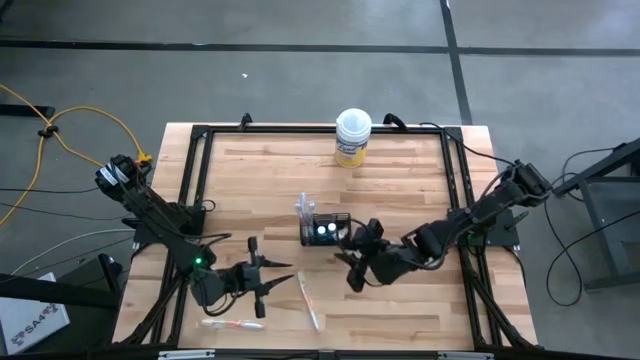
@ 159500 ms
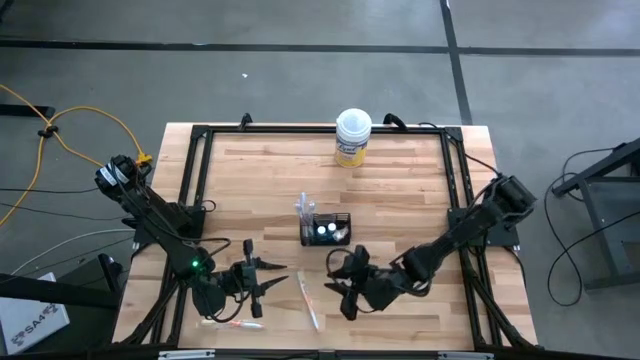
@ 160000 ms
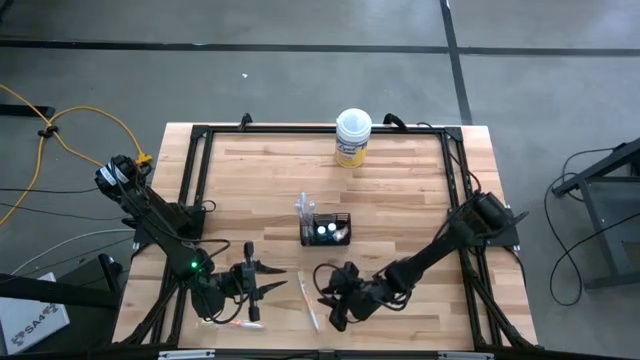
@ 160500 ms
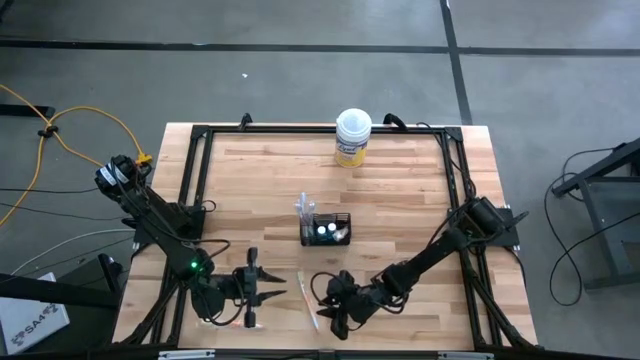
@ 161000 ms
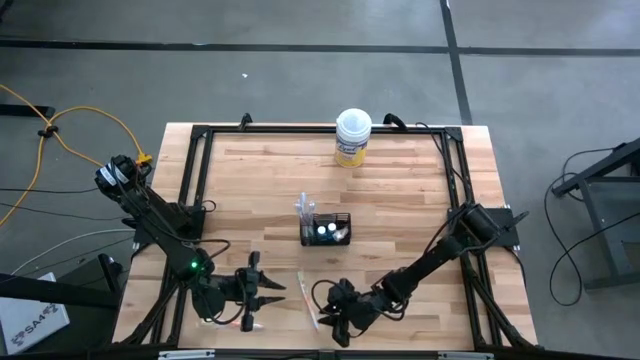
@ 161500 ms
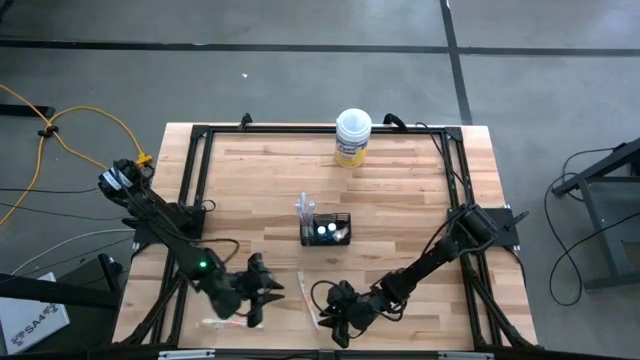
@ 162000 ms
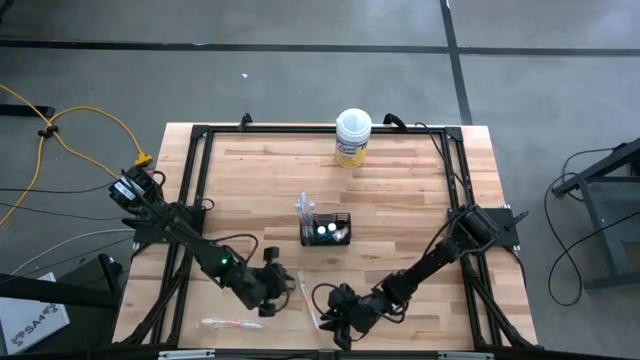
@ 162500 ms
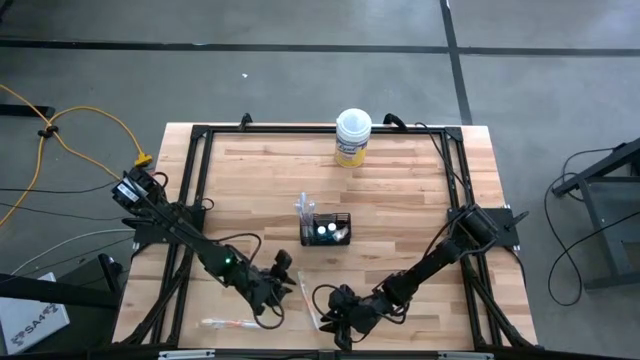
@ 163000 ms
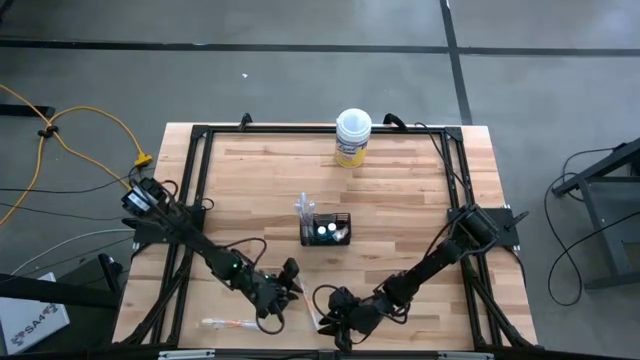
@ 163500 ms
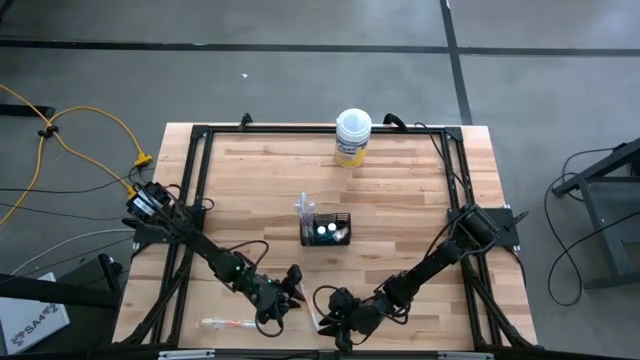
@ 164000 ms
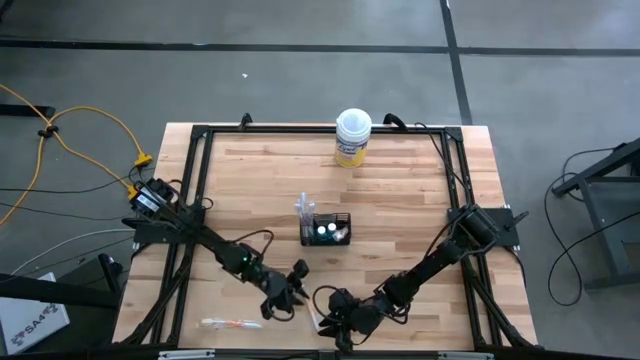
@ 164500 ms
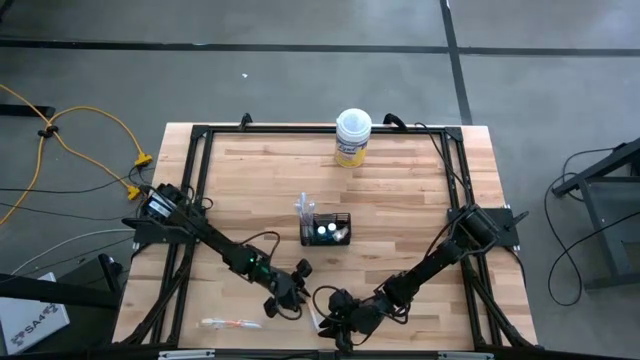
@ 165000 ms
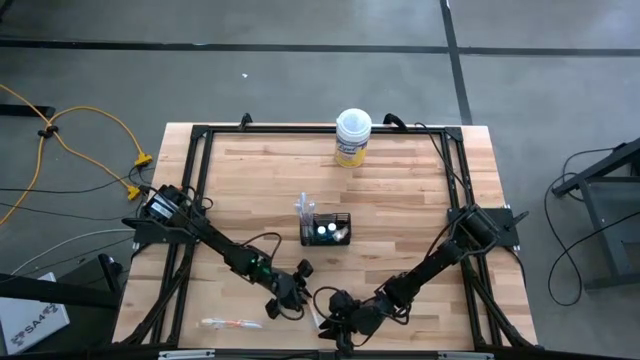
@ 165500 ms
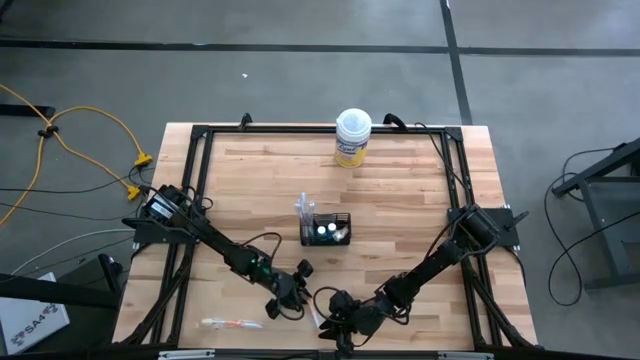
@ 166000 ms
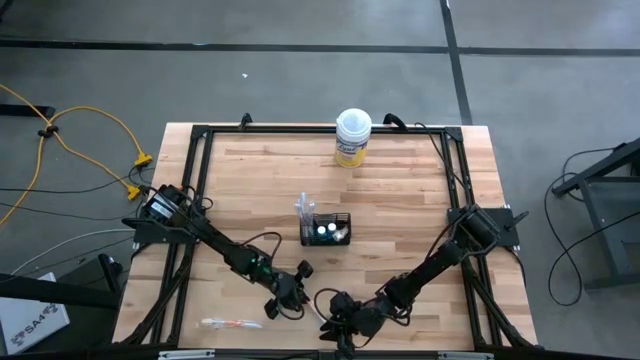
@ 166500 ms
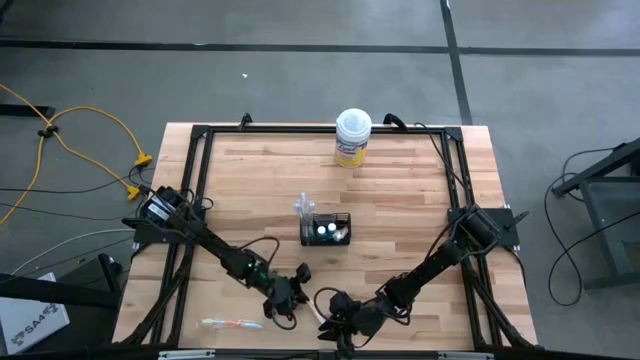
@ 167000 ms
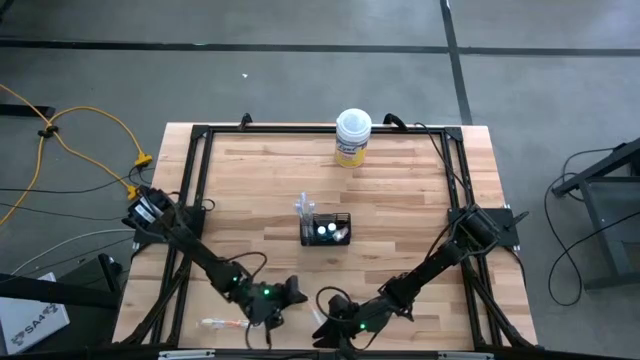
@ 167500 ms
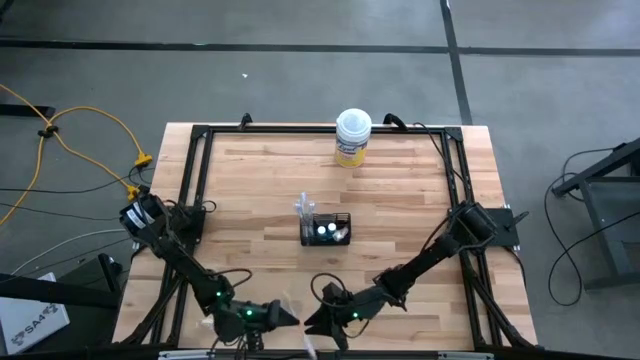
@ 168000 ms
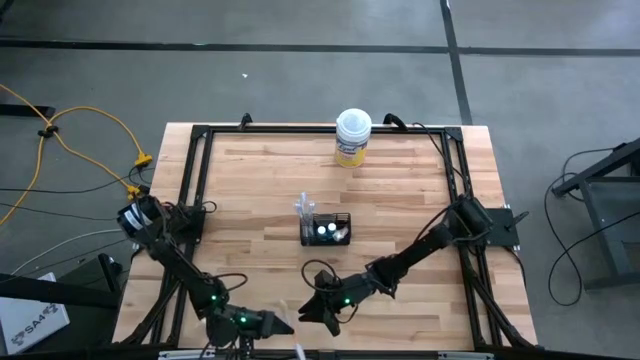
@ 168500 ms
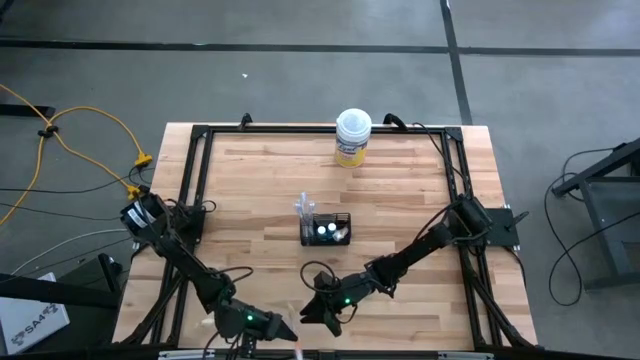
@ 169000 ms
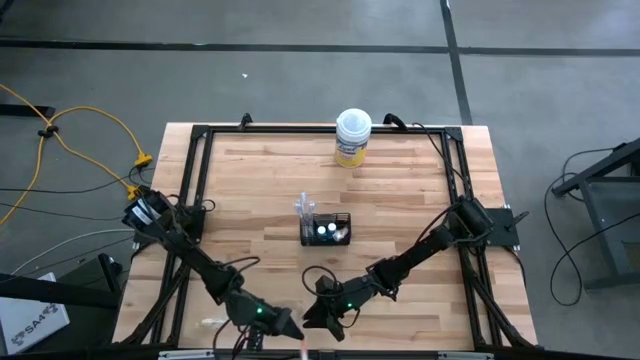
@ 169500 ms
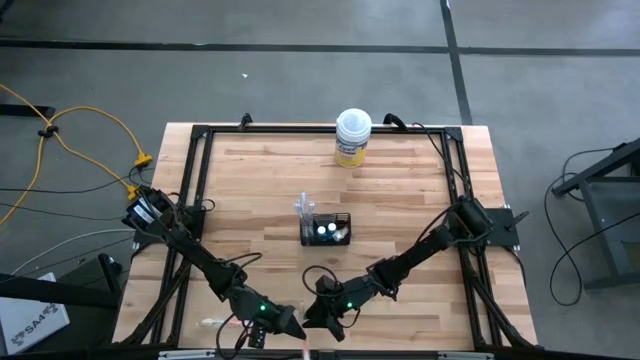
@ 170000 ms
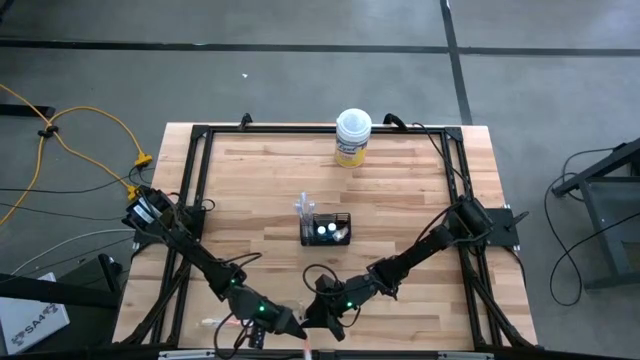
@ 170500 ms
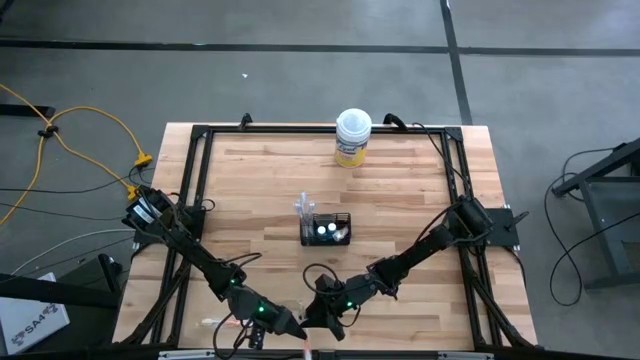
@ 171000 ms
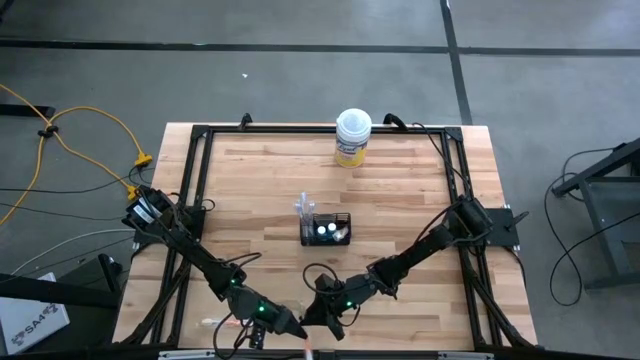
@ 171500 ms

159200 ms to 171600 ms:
Task: Pick & Place toothbrushing station
Put the right orange toothbrush into the wire organizer

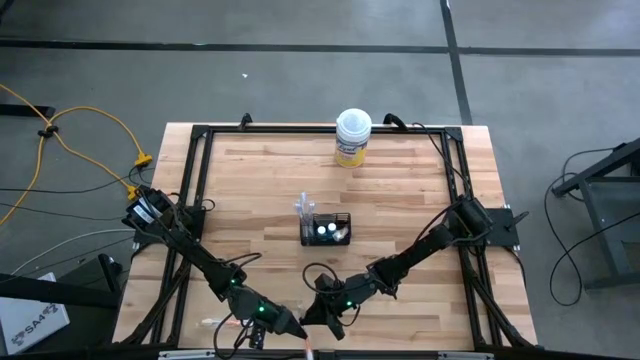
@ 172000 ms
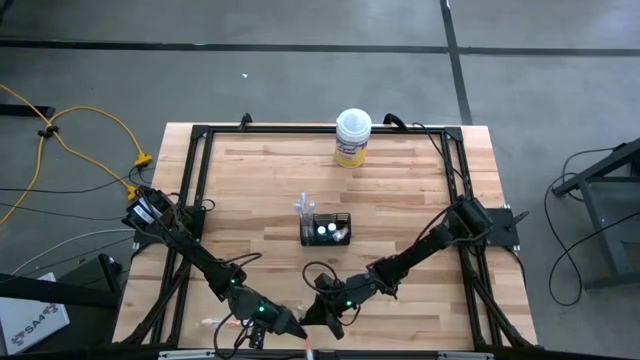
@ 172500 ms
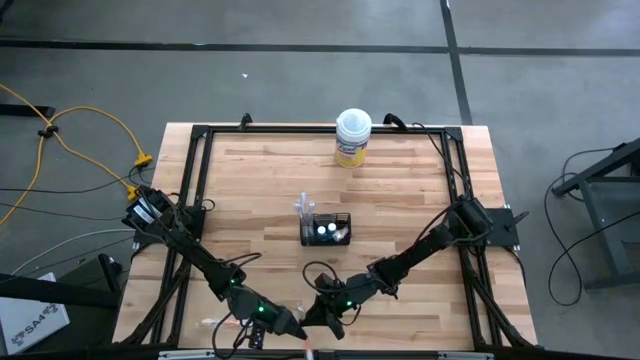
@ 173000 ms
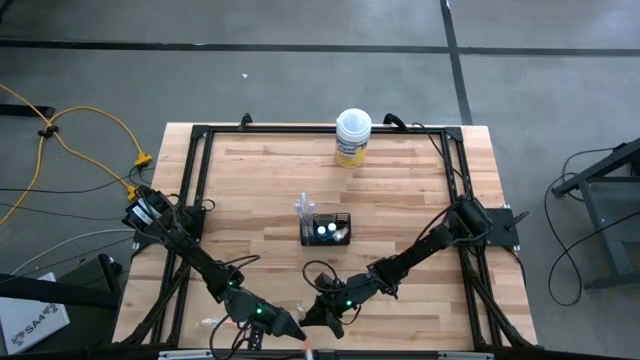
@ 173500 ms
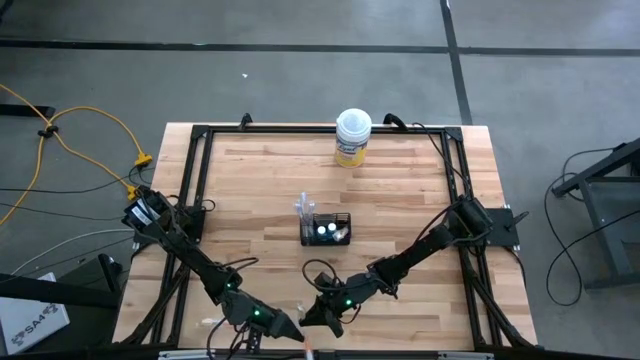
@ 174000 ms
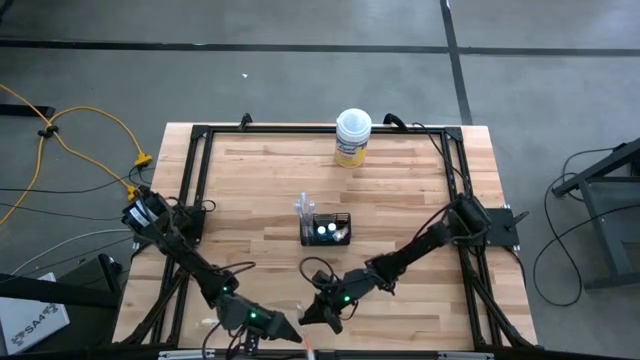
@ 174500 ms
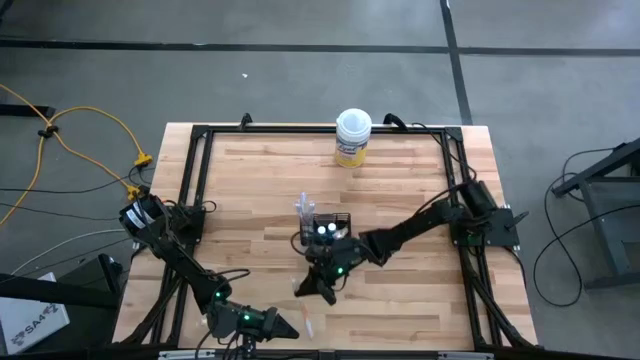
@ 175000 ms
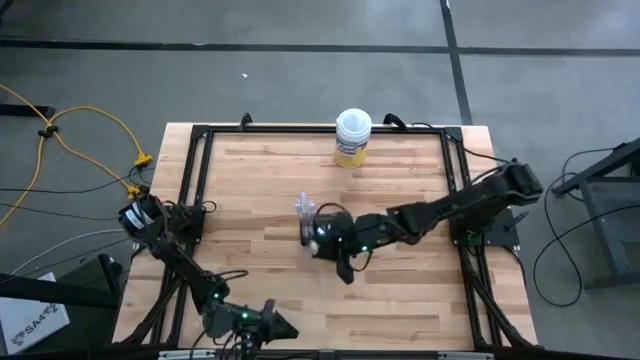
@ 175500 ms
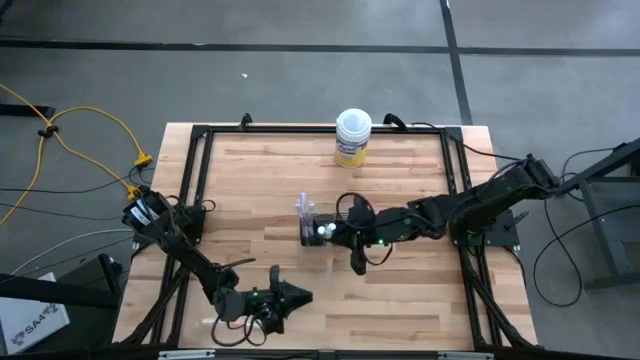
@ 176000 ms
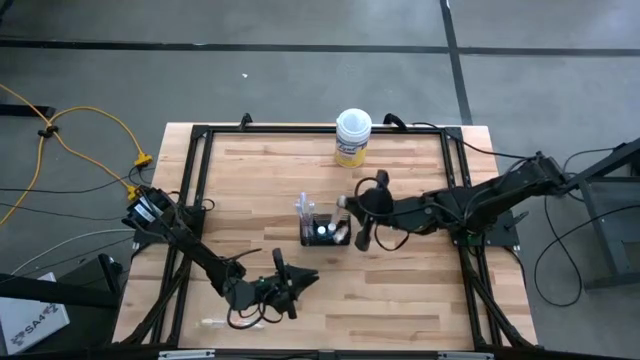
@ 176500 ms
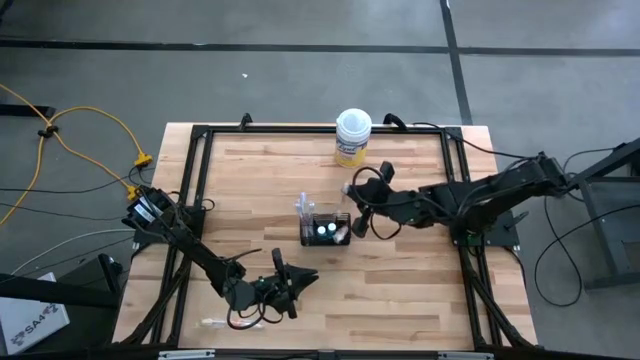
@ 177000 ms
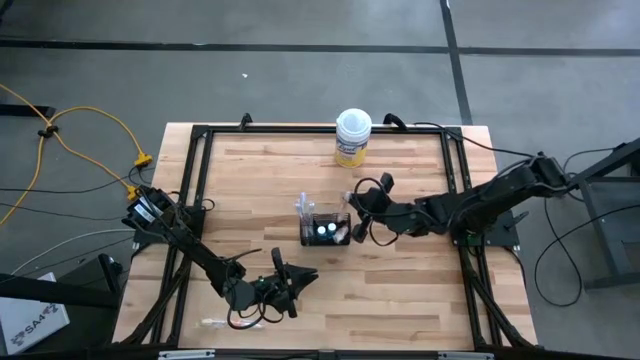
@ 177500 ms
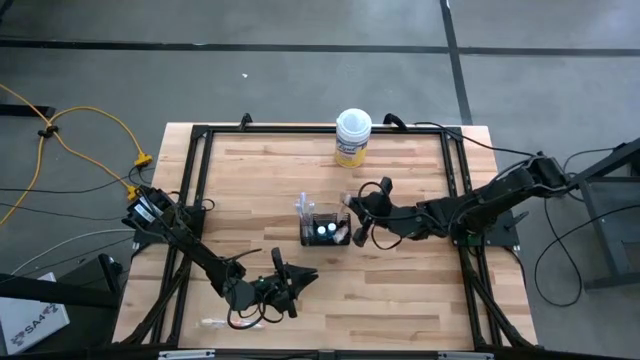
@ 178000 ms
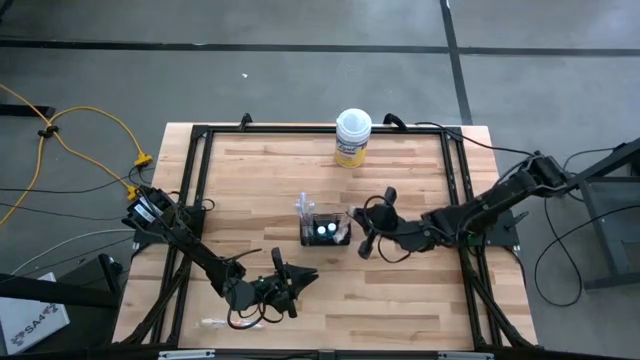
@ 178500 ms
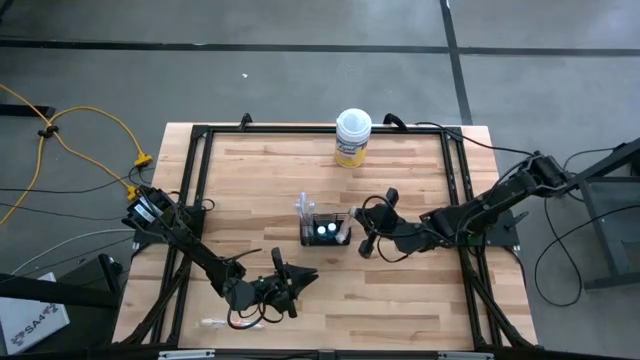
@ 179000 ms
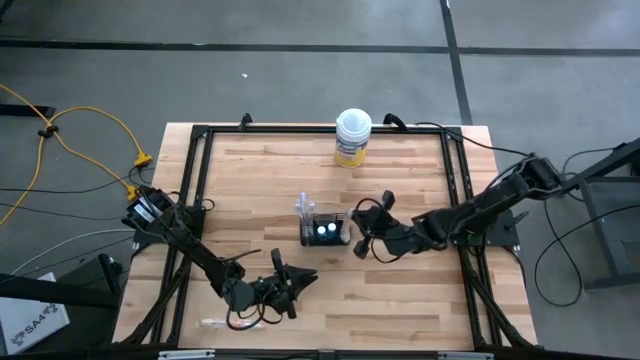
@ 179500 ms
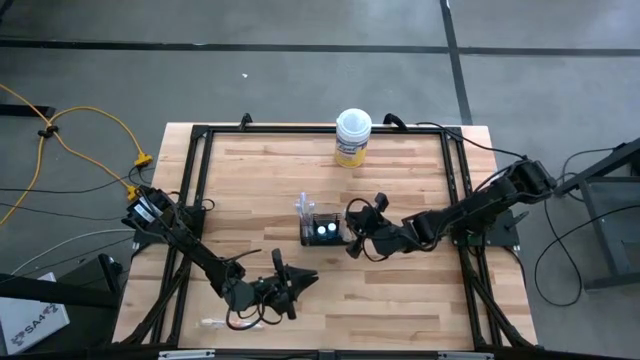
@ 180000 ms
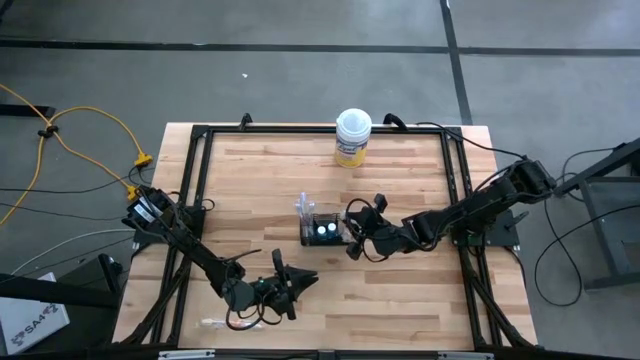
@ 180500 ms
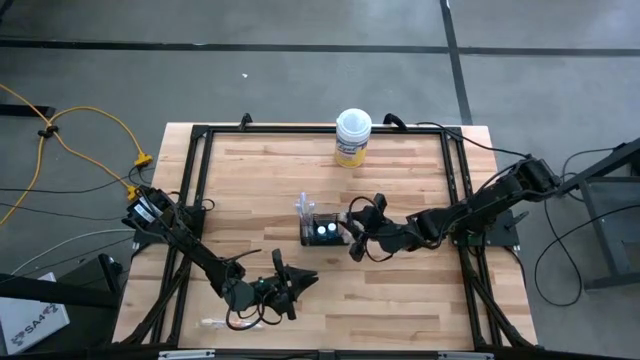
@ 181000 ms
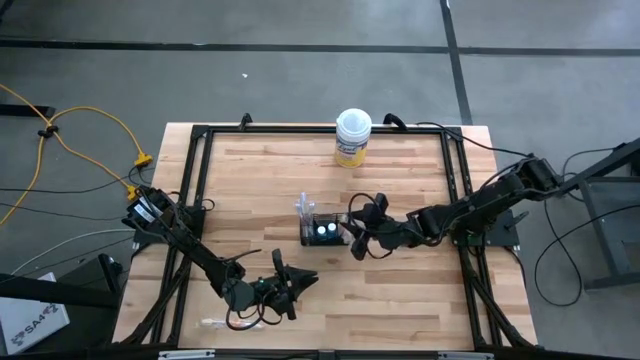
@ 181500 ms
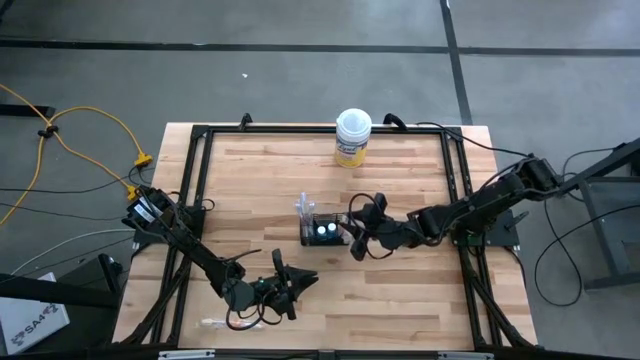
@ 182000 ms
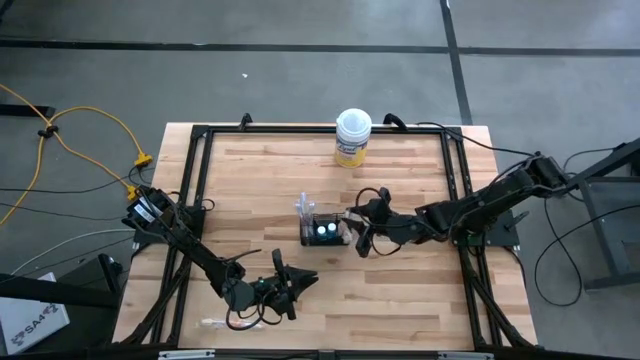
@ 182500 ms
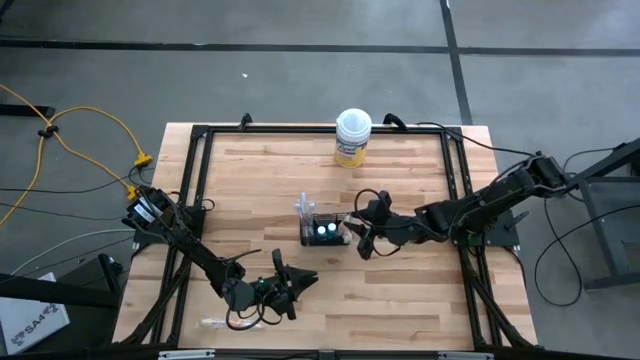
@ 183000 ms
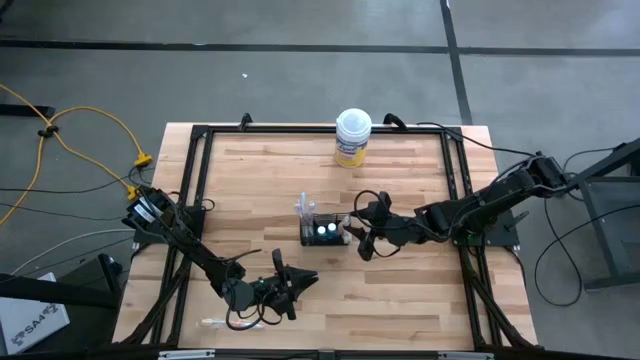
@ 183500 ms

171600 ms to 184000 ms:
Put the right orange toothbrush into the wire organizer
